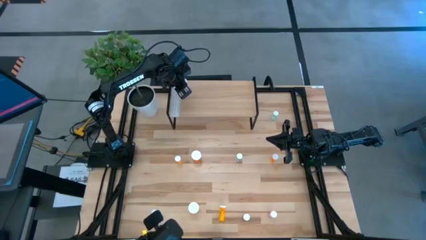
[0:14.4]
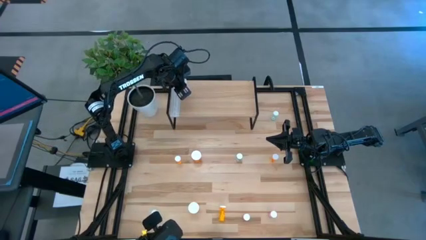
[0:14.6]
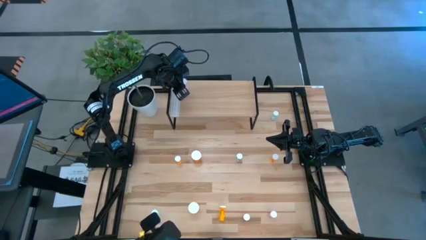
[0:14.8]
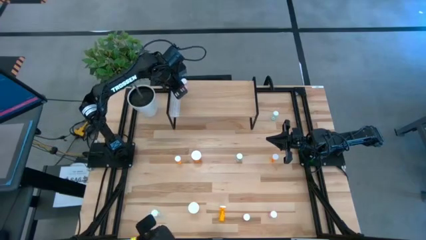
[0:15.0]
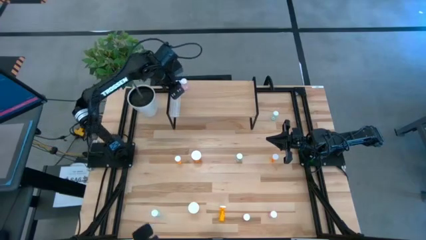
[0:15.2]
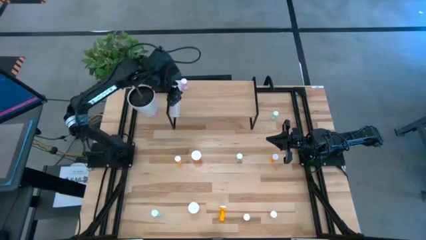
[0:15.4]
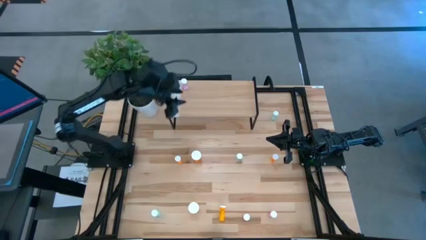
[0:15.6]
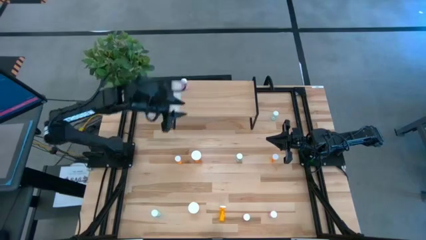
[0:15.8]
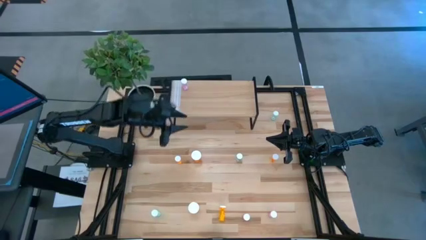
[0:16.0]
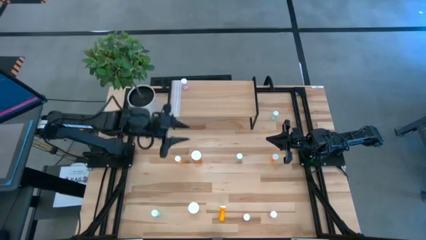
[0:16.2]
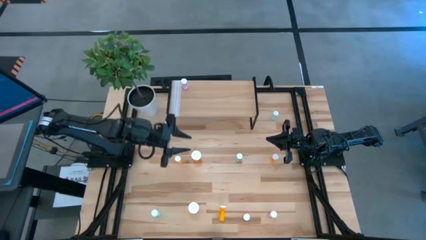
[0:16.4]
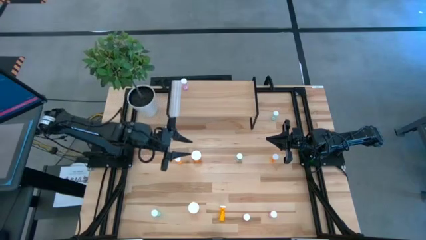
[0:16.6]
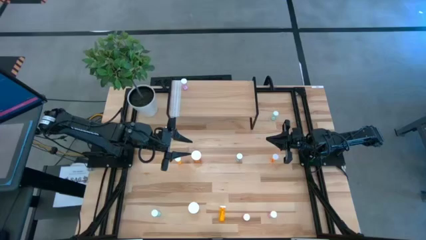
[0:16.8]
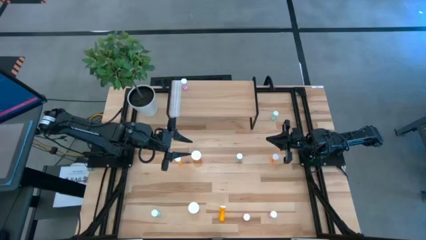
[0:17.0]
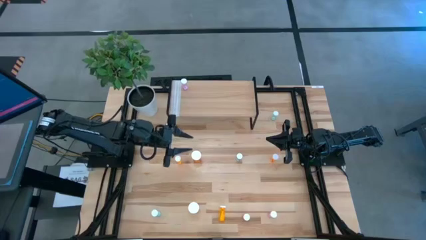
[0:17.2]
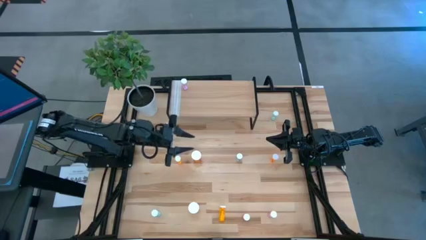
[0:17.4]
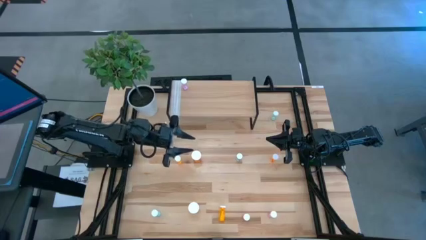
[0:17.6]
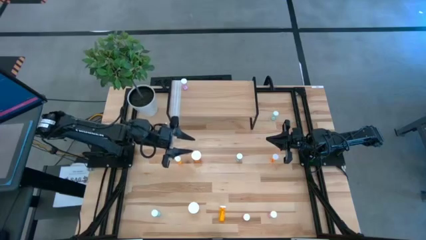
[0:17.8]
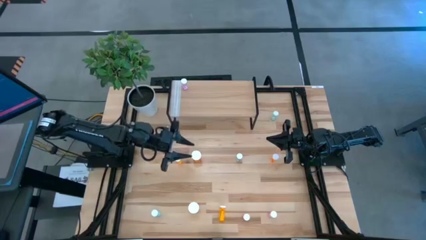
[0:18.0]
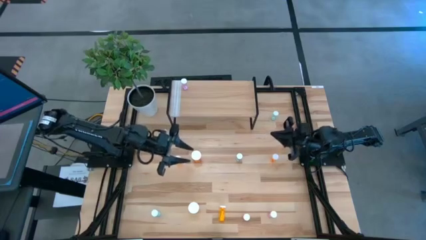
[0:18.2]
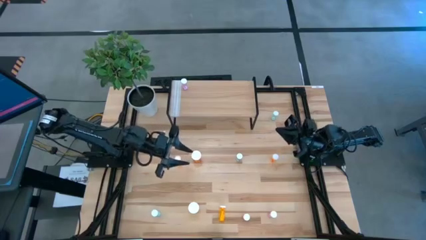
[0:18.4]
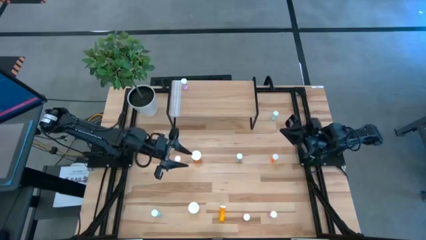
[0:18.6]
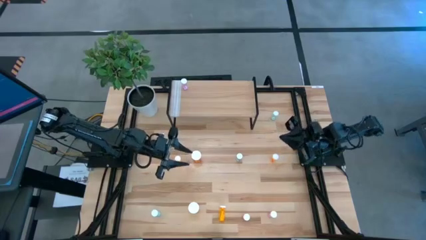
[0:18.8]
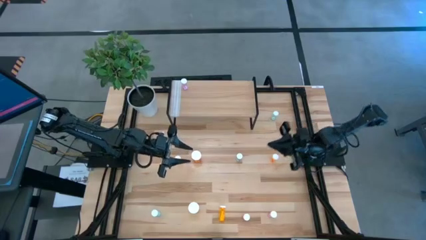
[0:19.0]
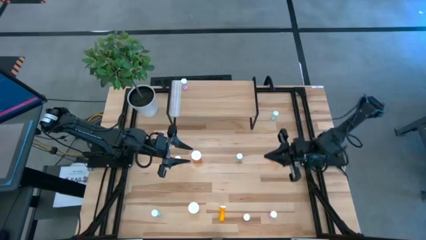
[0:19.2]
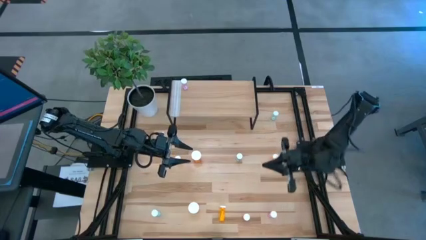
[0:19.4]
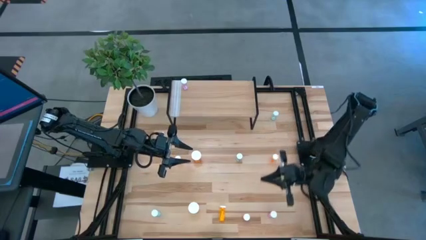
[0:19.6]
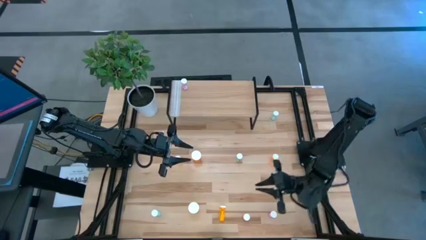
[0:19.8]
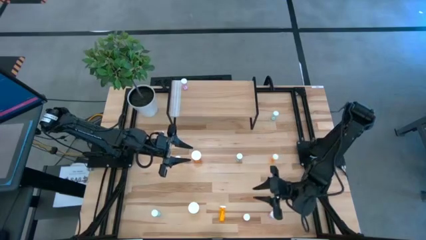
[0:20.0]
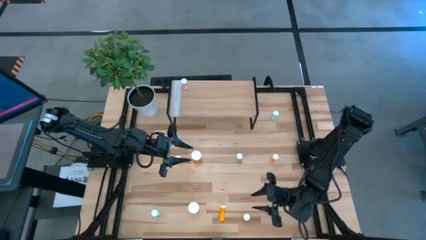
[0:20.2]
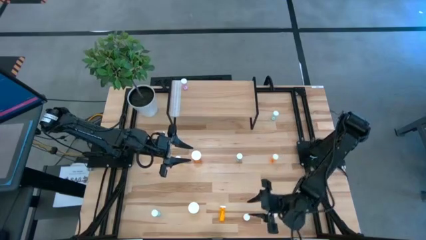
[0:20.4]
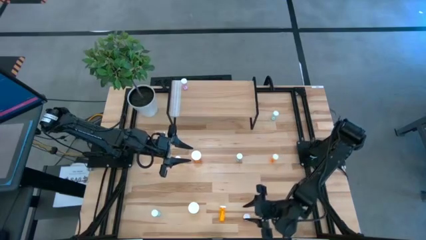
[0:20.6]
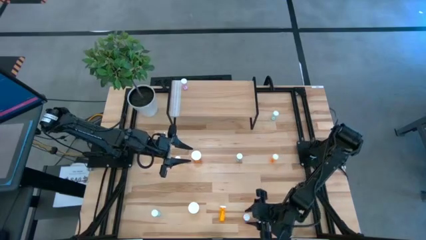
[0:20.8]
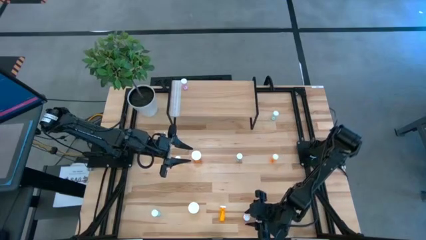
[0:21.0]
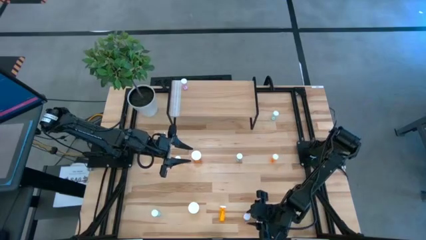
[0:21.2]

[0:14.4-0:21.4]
Task: Pick and place medicine bottles onto shelf by color
Put the left pink pill bottle on the shelf aligned with the other pink pill bottle

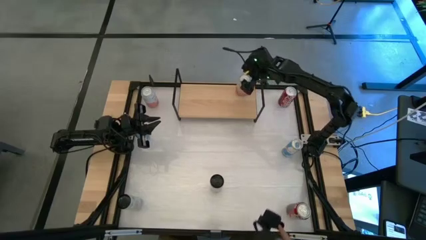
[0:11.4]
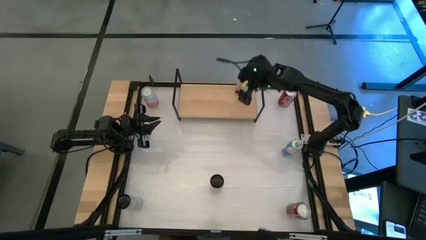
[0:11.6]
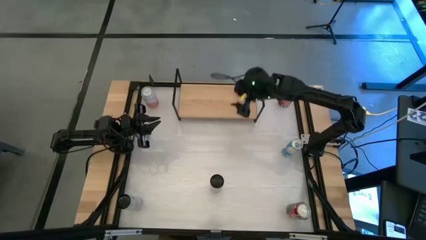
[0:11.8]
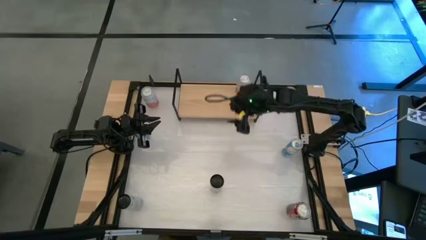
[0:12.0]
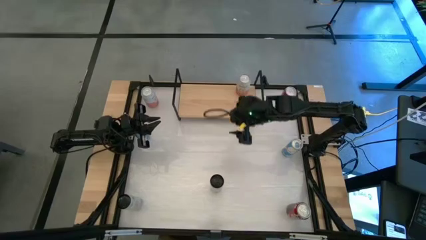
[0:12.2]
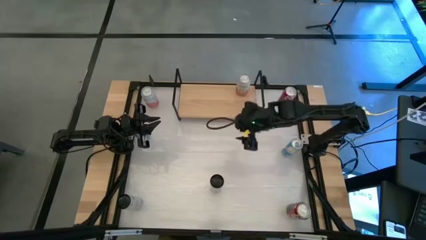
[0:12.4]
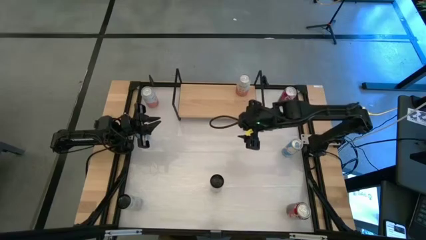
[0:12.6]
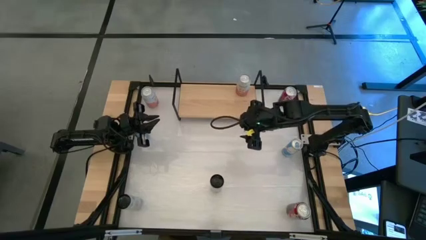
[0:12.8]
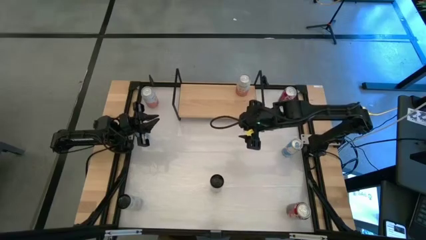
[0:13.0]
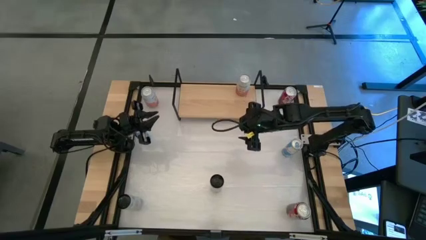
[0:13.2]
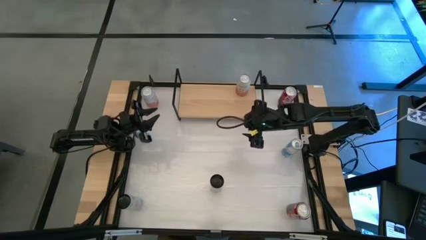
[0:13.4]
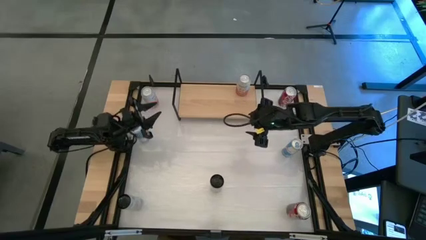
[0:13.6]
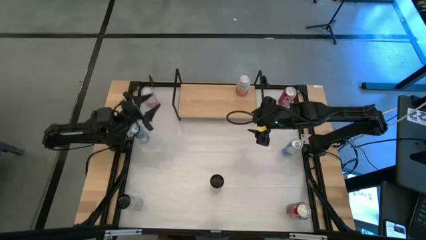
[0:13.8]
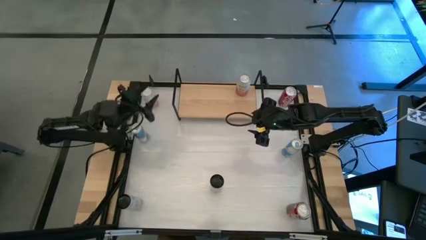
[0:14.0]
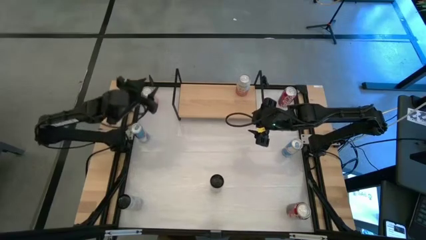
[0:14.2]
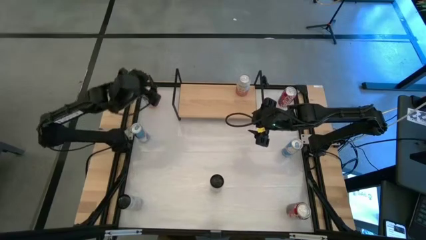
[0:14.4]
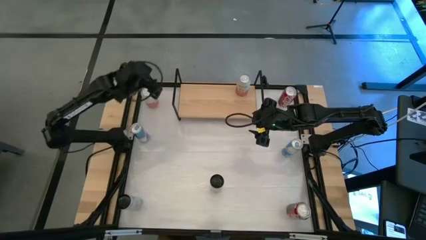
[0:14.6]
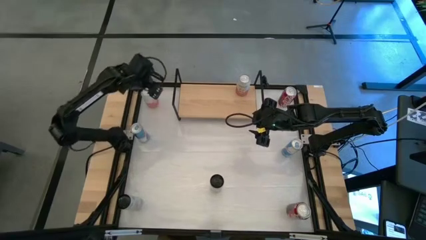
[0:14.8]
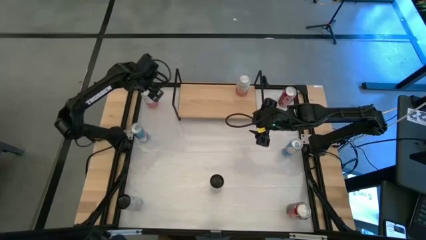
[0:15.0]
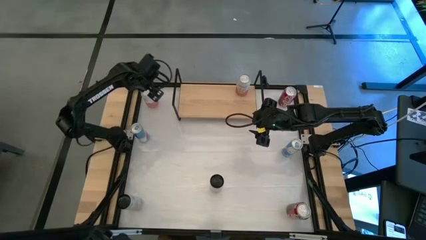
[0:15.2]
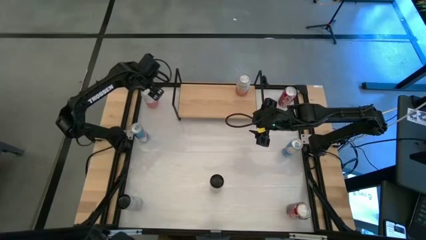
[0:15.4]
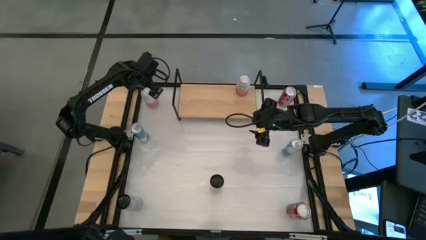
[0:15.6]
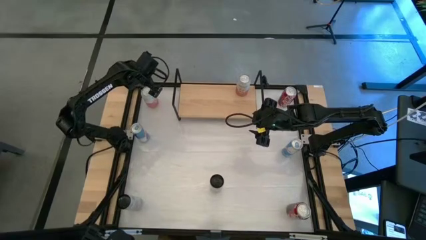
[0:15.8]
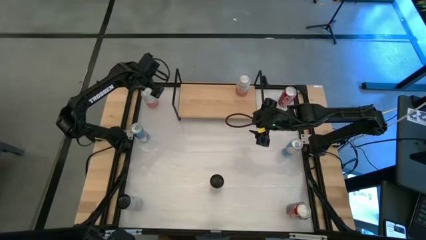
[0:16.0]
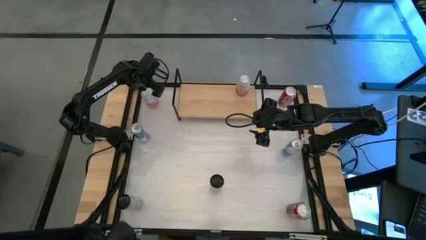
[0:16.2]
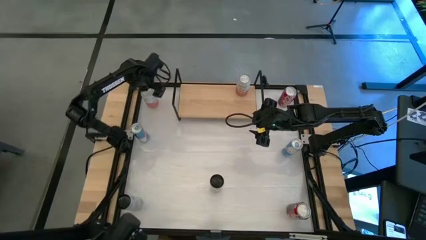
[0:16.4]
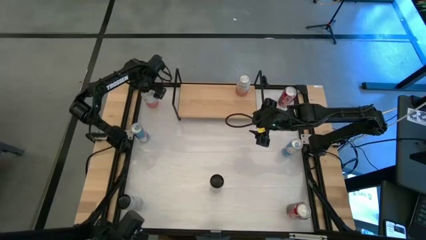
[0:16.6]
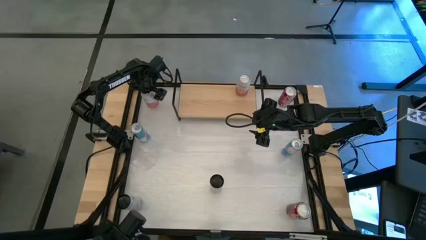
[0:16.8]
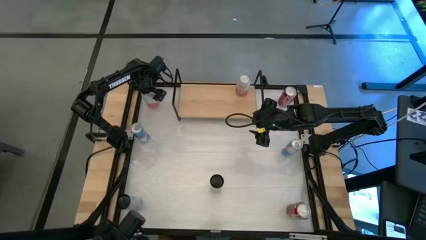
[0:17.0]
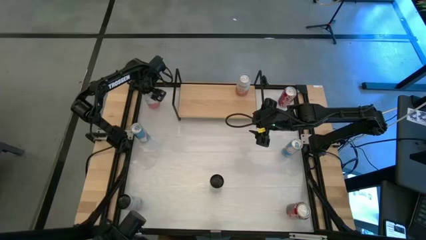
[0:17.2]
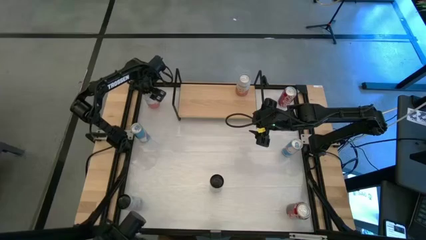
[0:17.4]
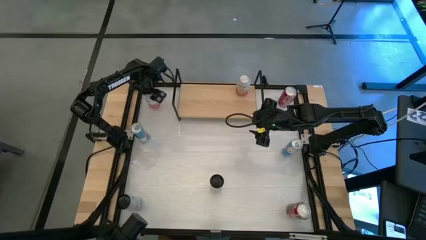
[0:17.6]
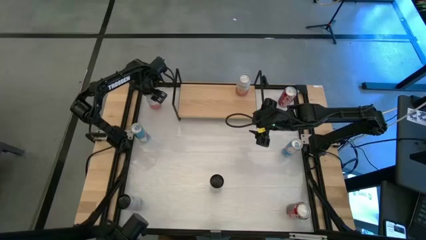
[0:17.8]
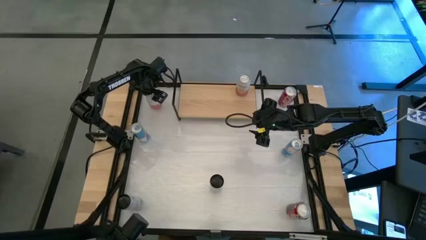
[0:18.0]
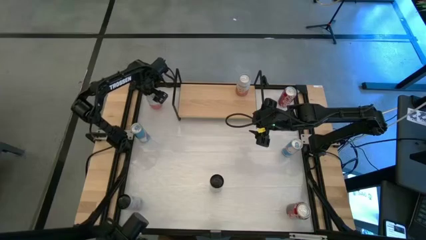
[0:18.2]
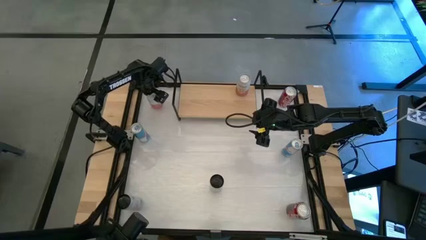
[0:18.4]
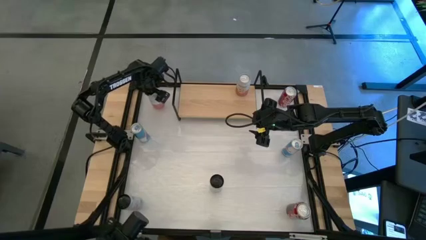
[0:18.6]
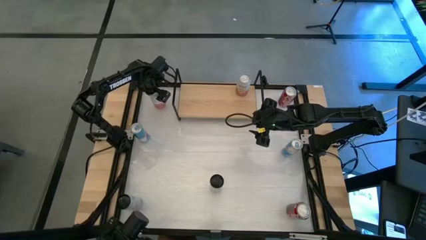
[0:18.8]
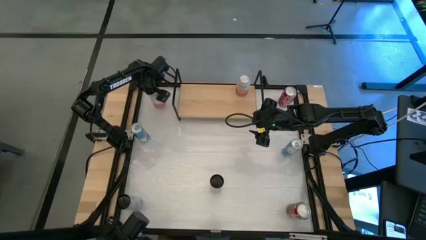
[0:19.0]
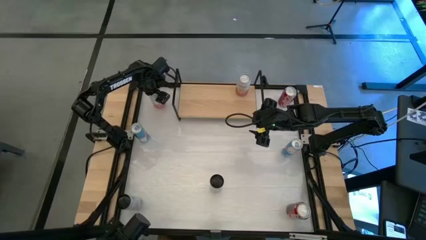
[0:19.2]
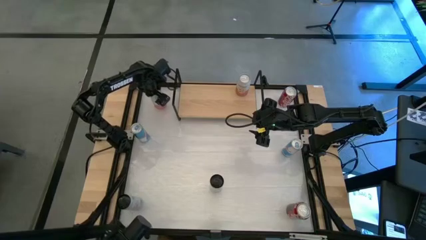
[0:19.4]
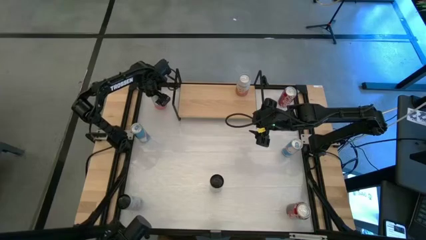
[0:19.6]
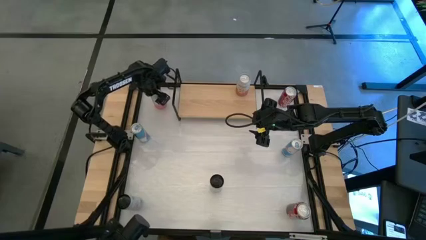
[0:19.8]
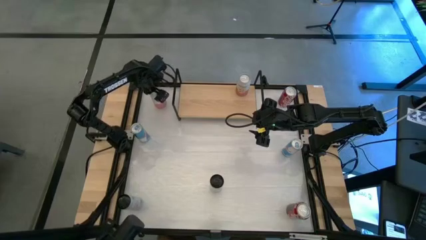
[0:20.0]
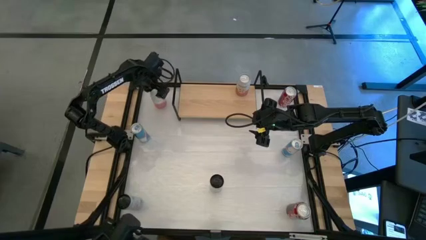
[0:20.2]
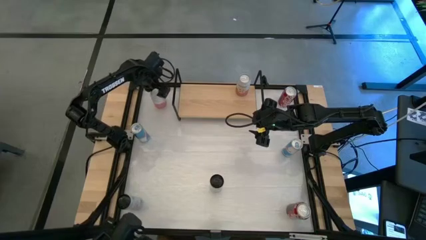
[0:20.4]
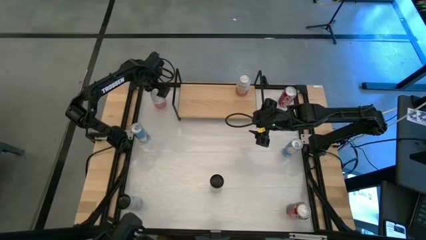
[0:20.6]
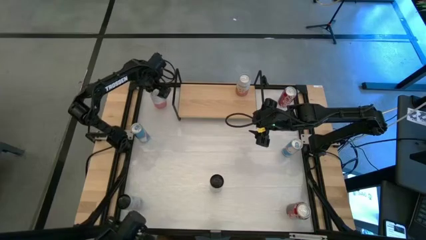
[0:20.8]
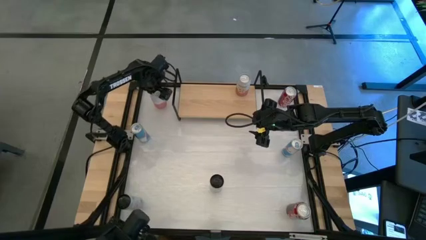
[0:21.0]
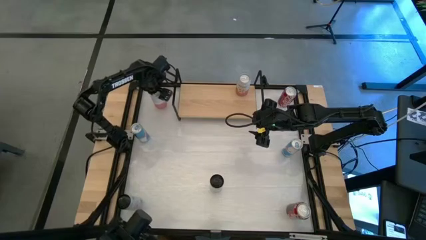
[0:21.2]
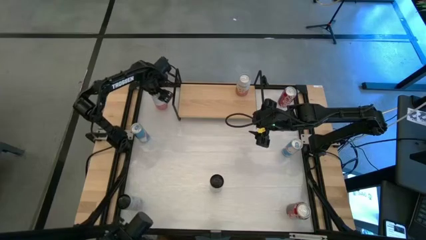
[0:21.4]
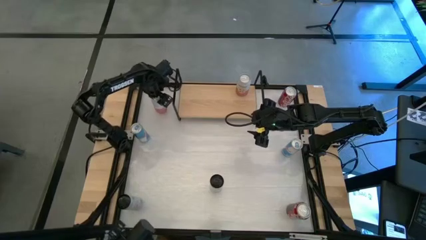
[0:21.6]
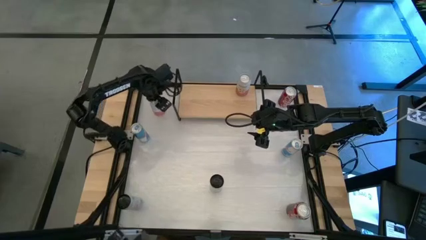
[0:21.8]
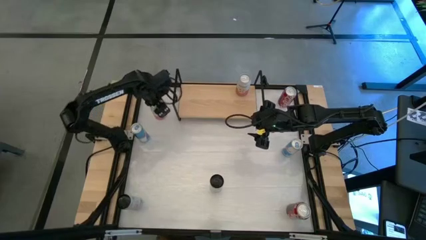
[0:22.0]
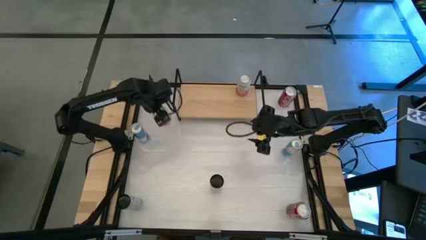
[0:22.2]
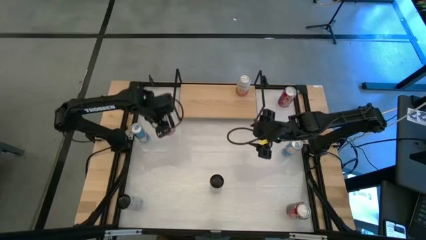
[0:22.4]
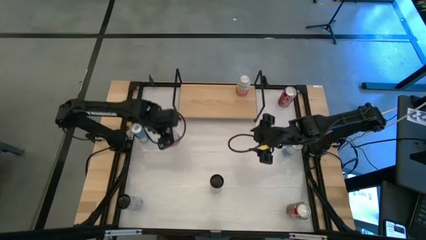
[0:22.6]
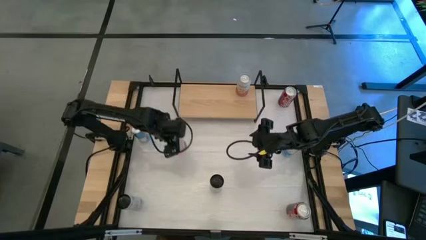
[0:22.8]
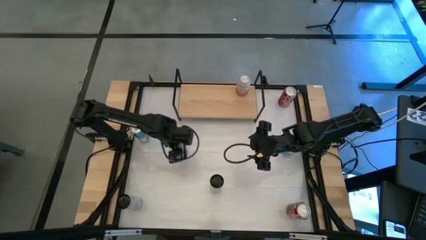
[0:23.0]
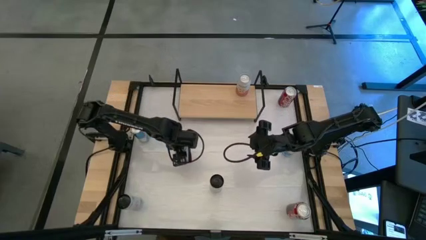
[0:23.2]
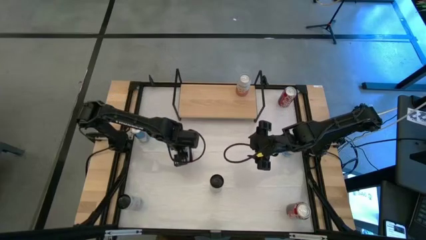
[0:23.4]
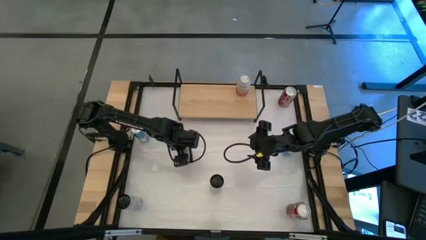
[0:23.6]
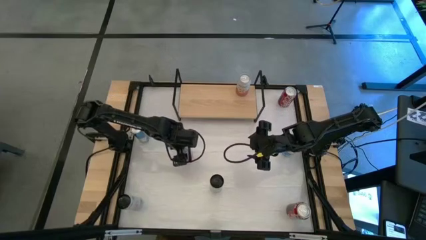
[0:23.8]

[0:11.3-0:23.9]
Task: Place canned beverage on shelf
Move the orange soda can to the center of the table
